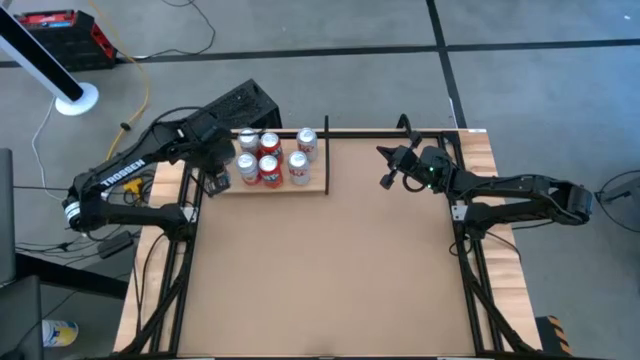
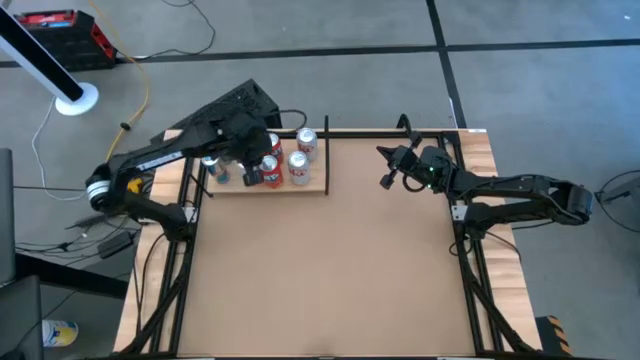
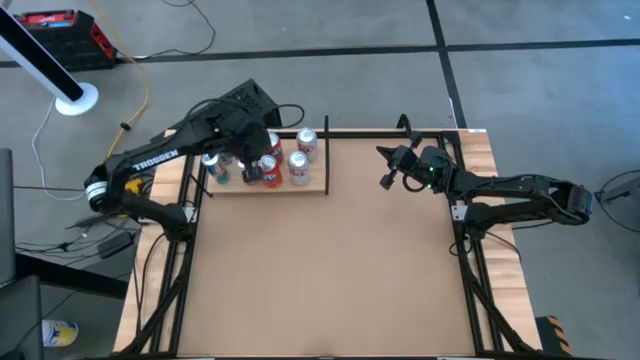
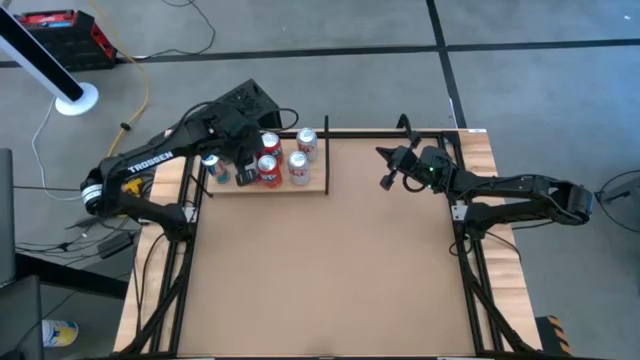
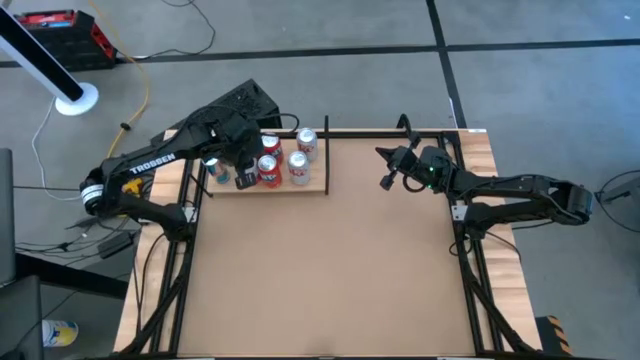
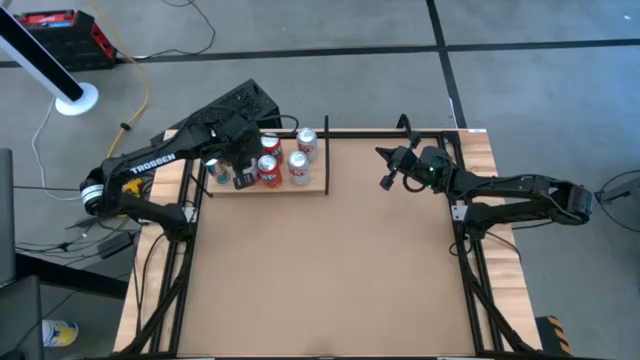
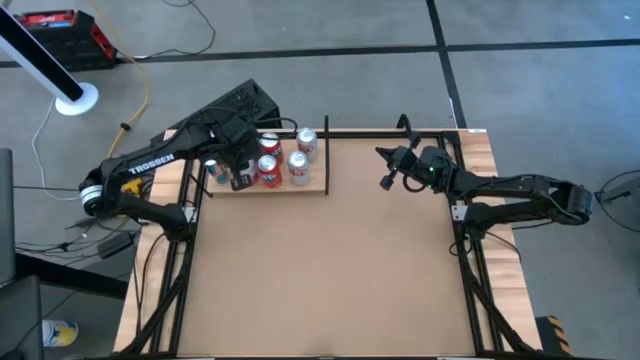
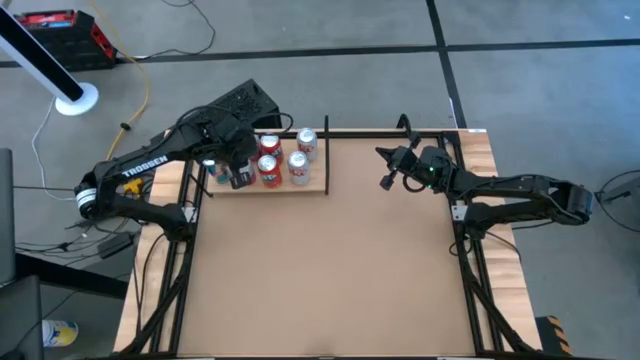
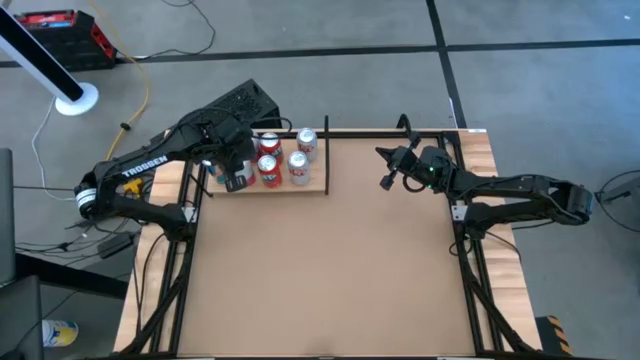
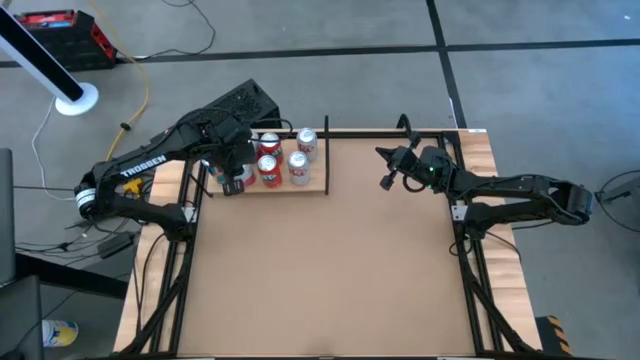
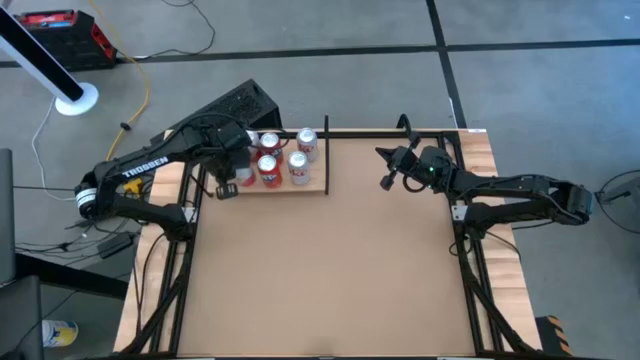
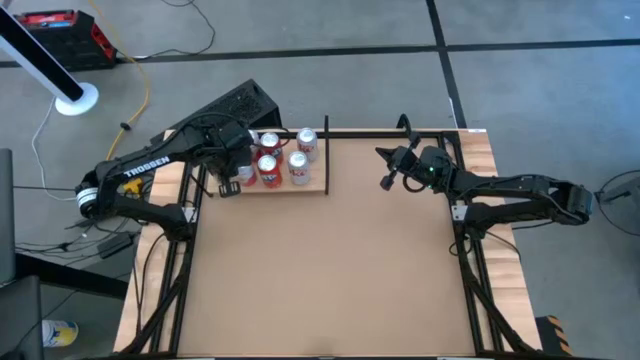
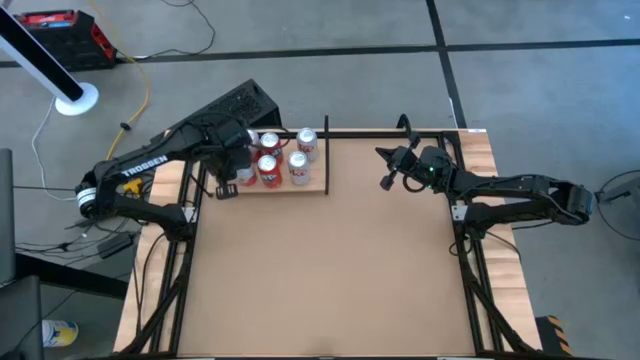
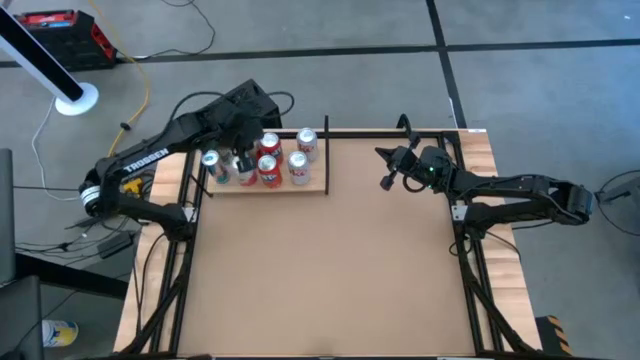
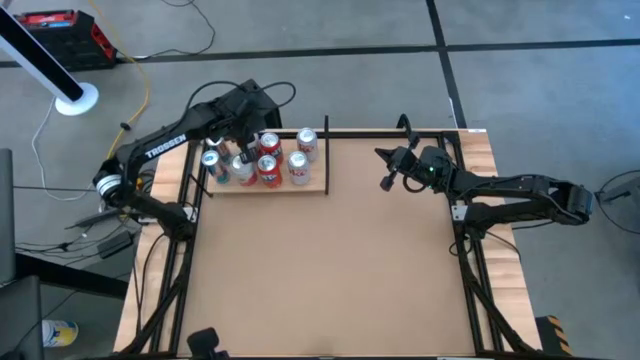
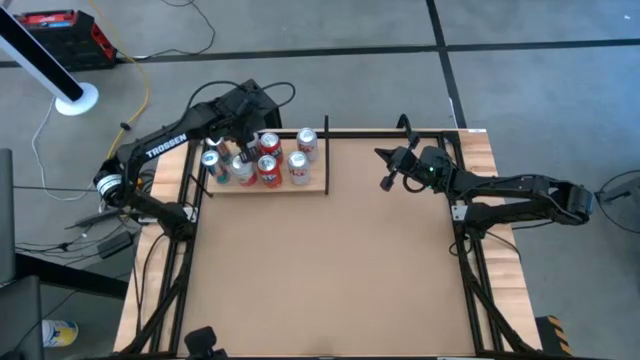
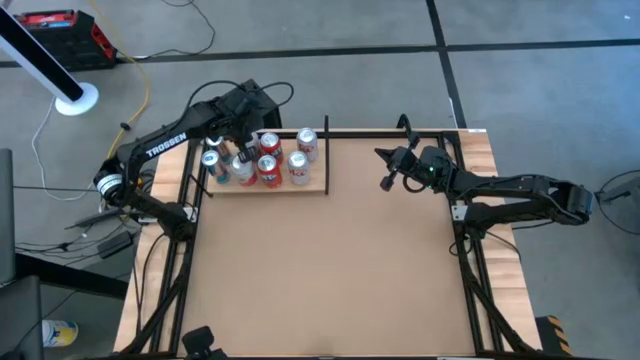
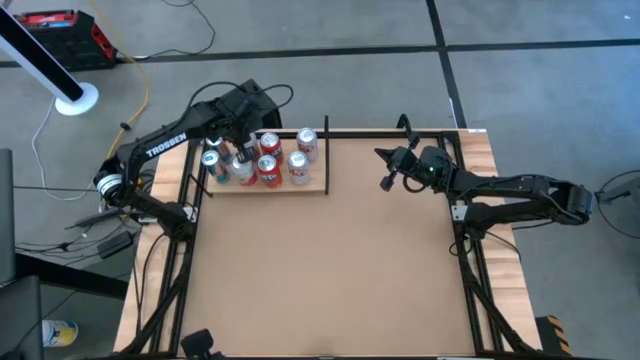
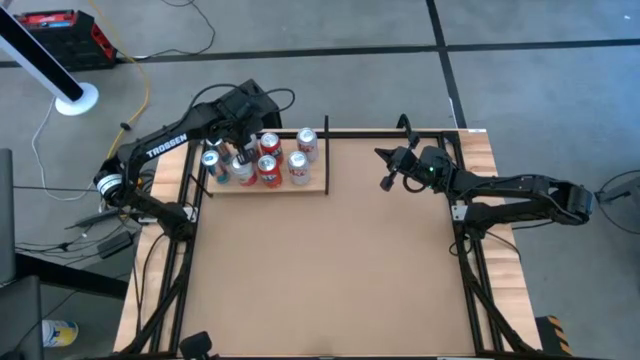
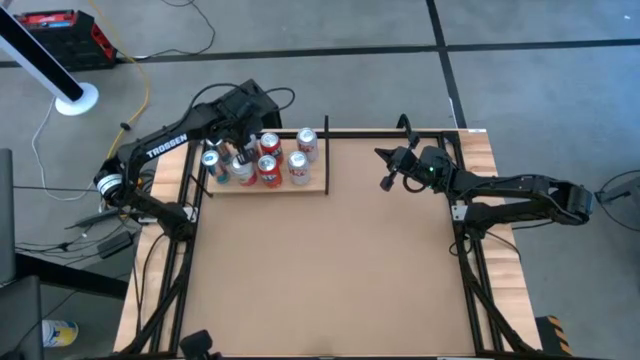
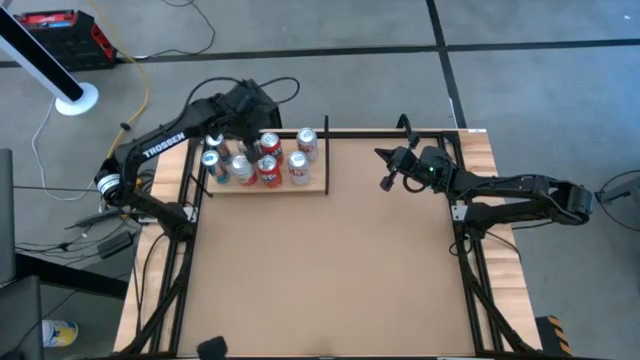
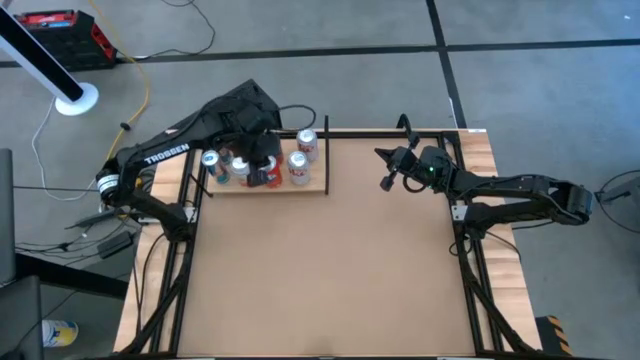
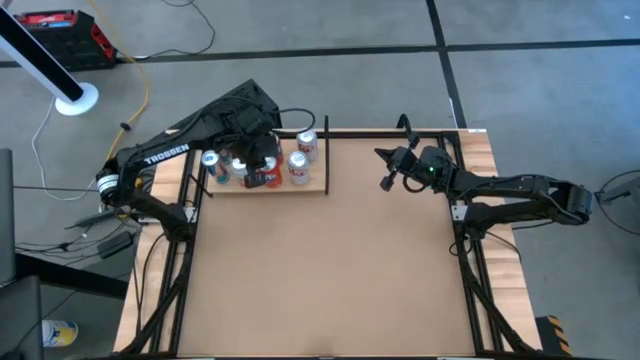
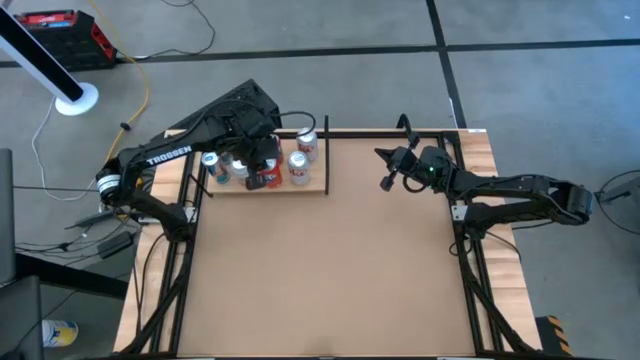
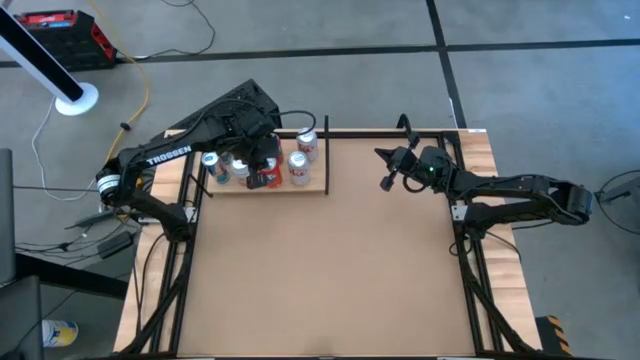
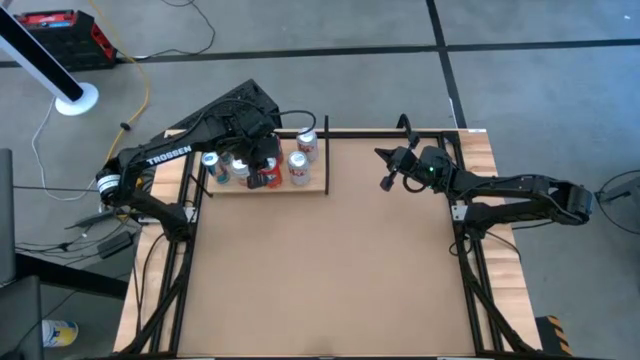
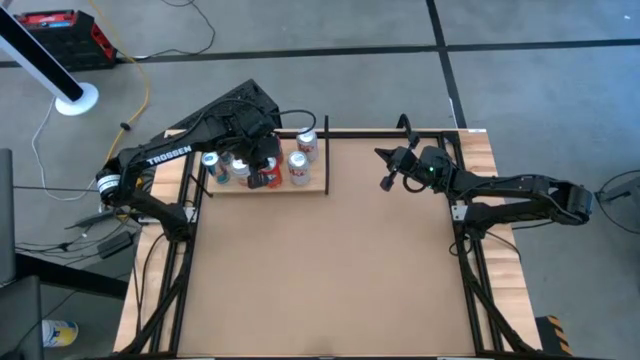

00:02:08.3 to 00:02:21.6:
Task: Place canned beverage on shelf
Adjust the soda cans on the shelf

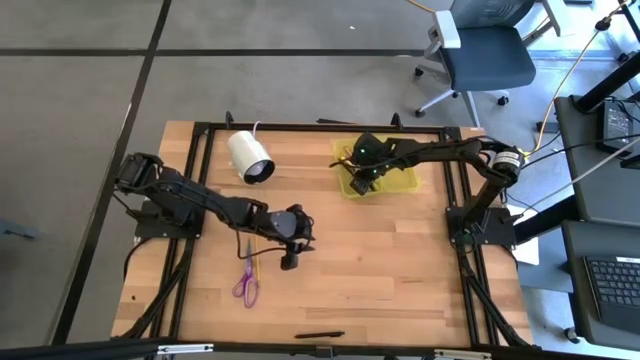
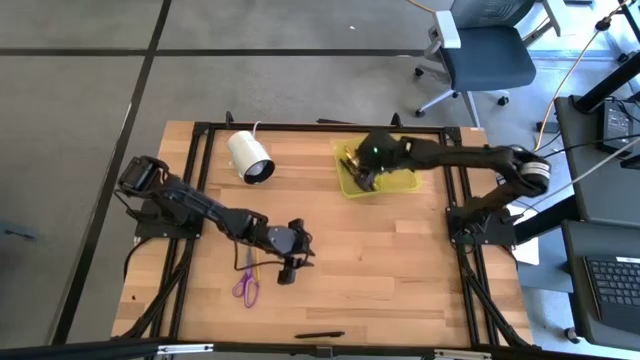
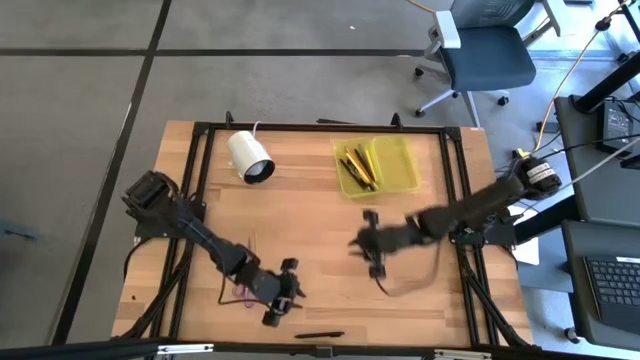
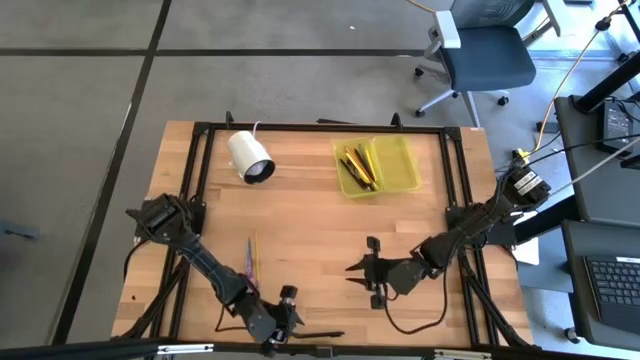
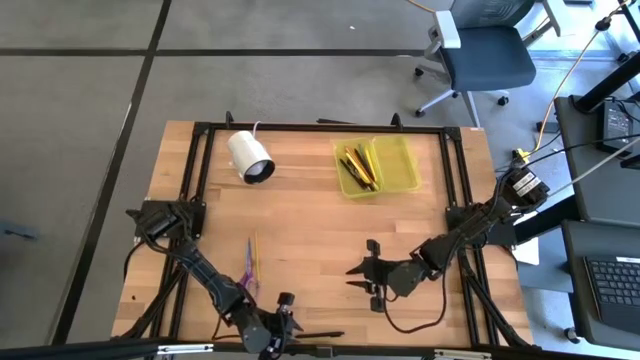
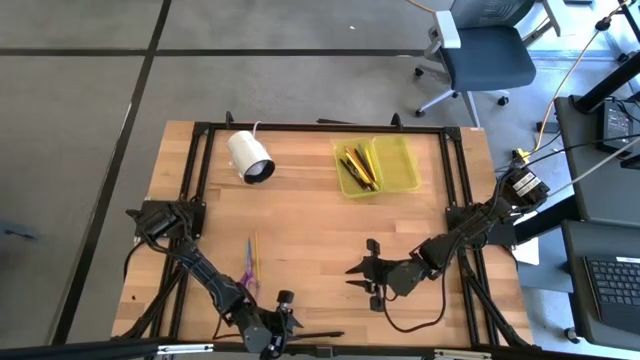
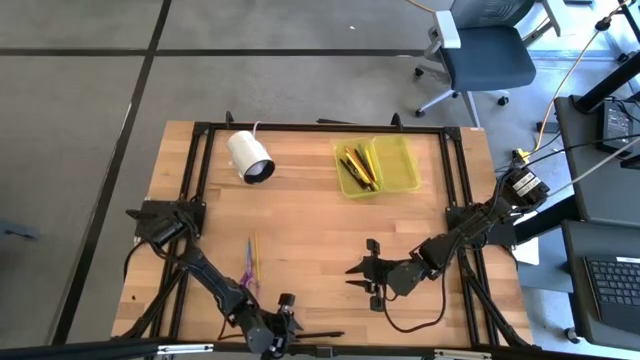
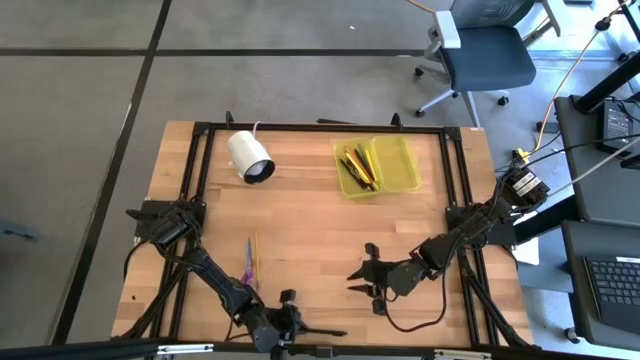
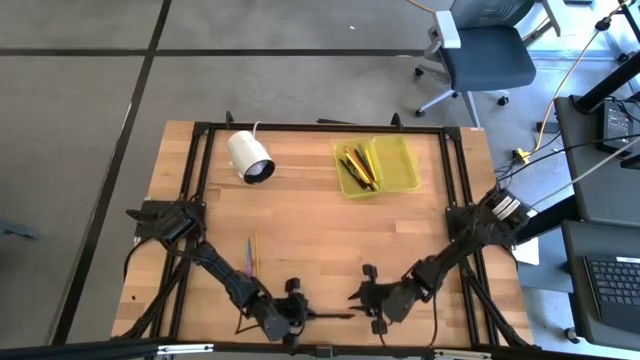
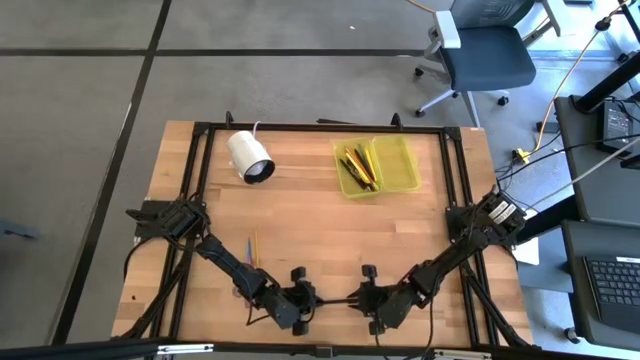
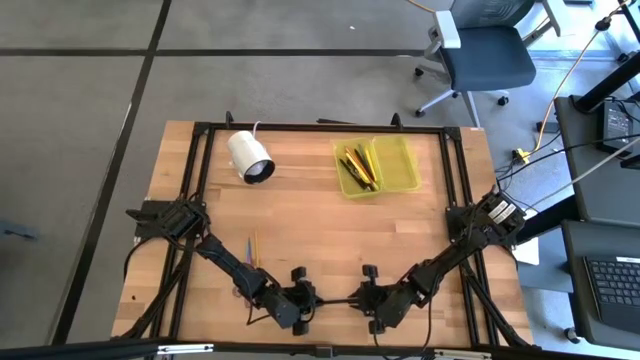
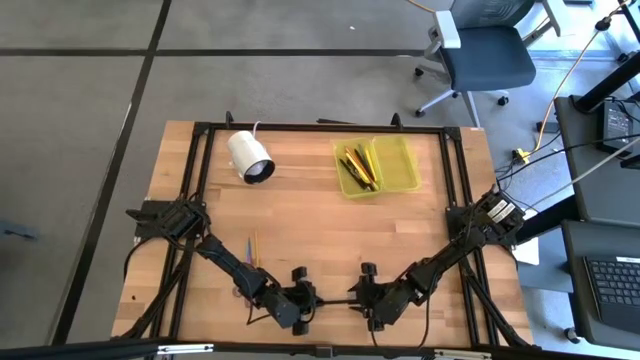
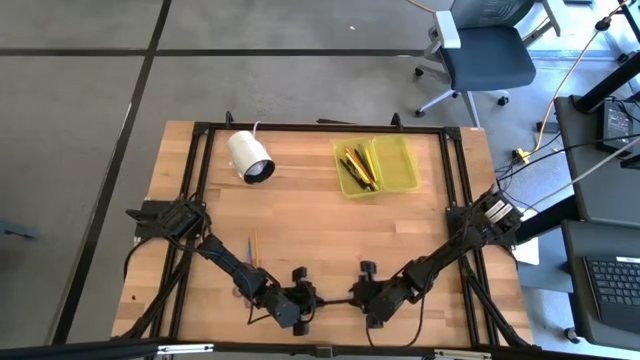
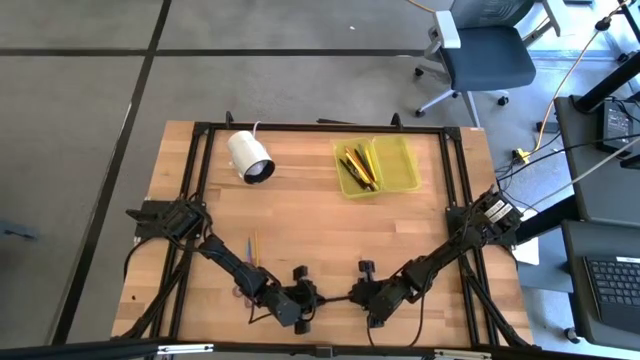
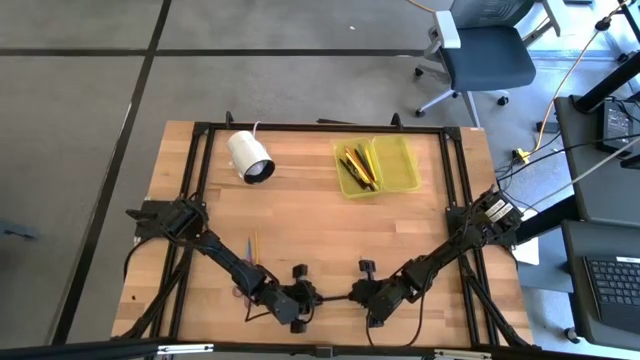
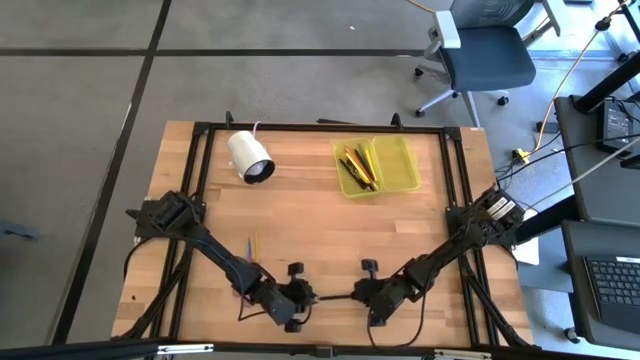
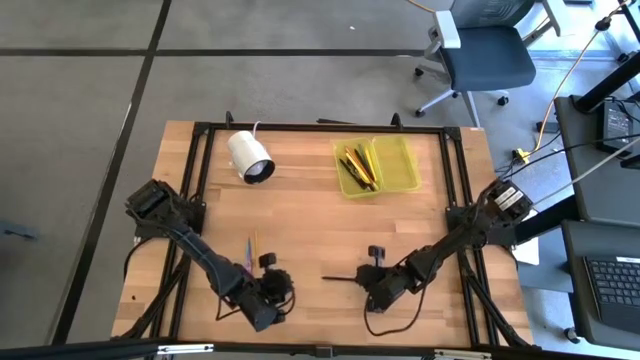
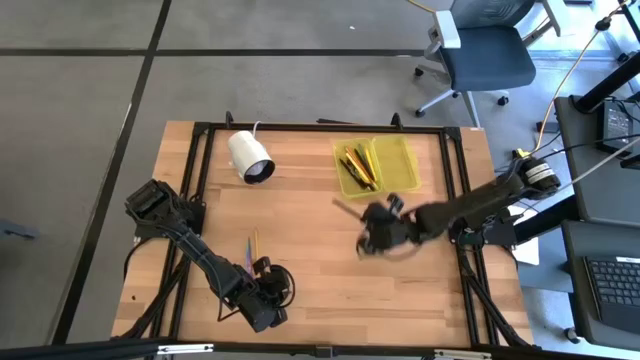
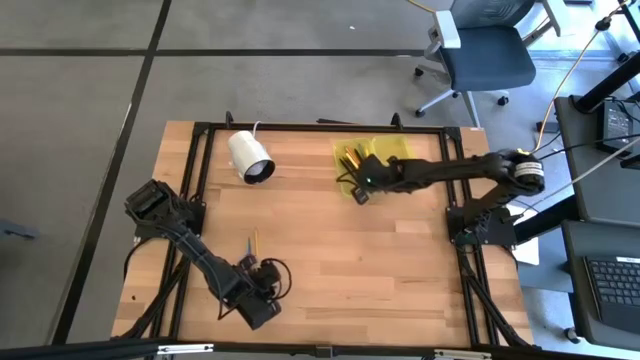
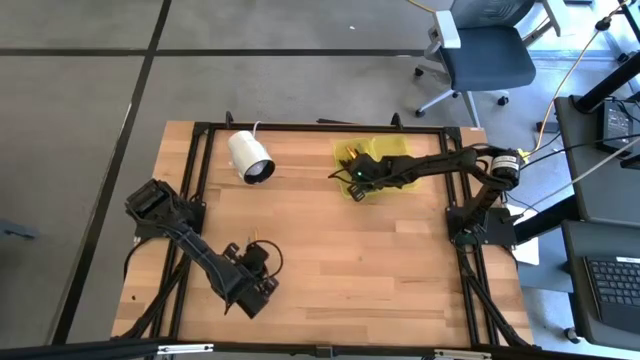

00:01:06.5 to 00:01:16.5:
Task: Pick & place school supplies into a supply box
Put the black pen into the yellow supply box
